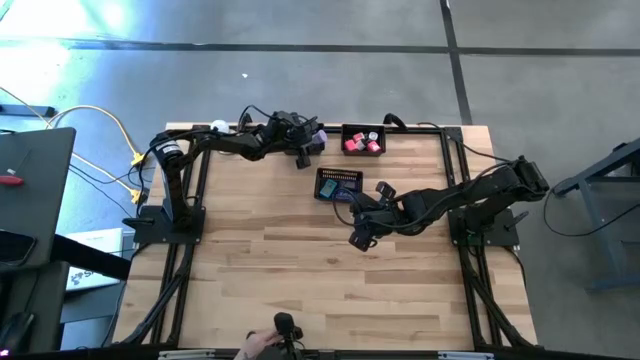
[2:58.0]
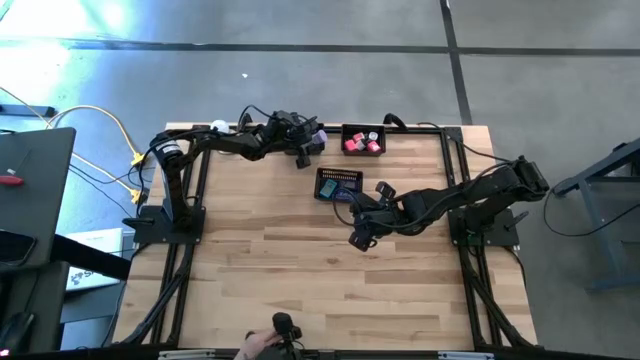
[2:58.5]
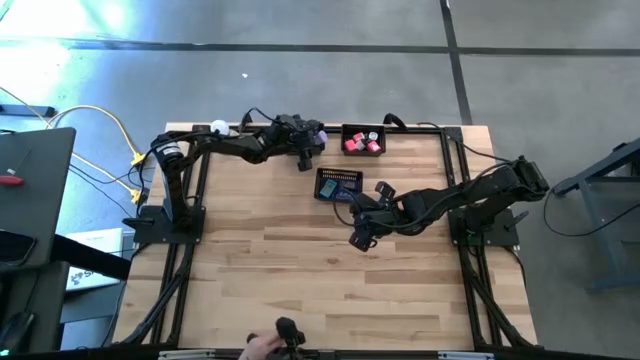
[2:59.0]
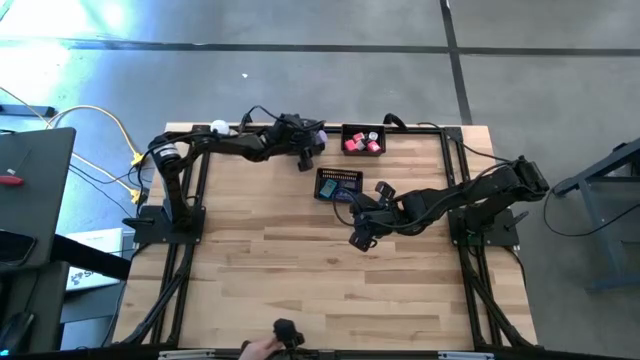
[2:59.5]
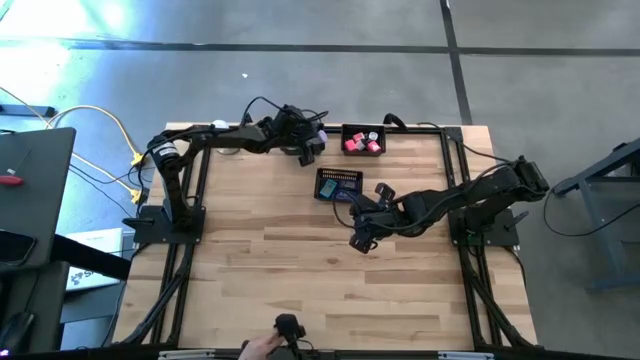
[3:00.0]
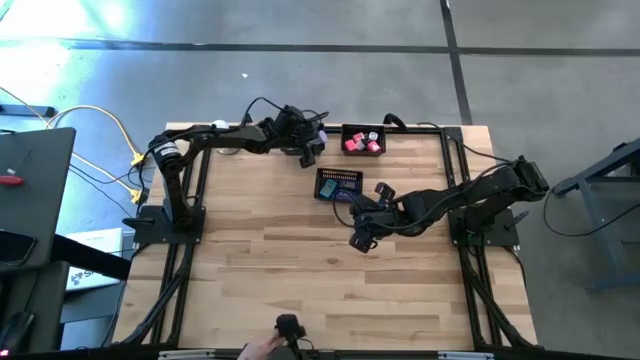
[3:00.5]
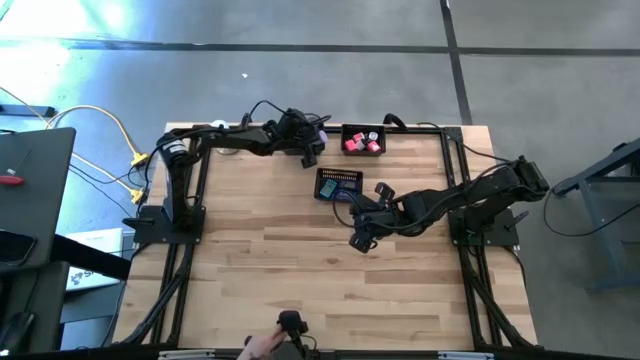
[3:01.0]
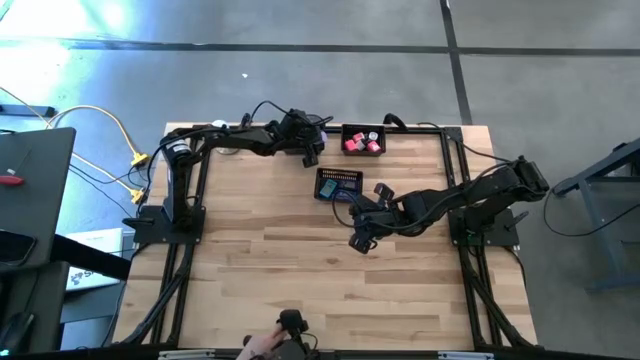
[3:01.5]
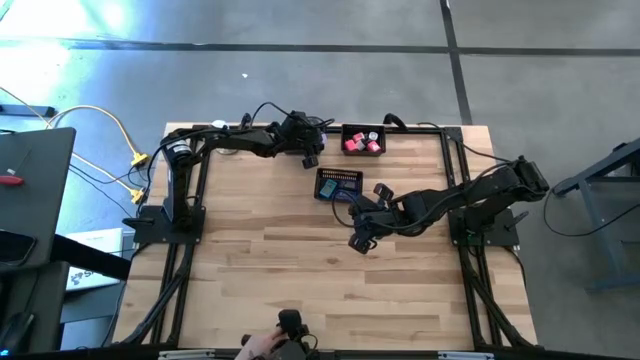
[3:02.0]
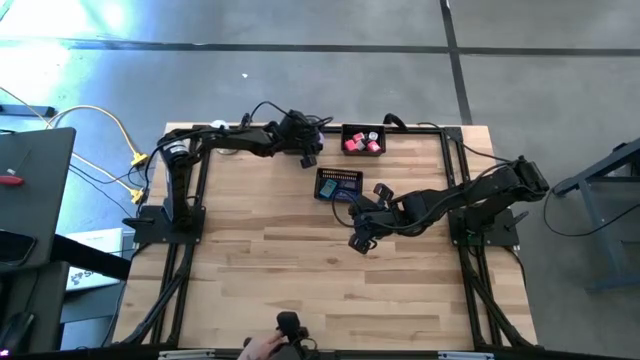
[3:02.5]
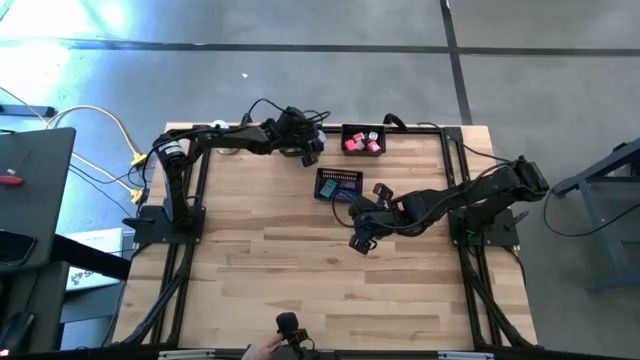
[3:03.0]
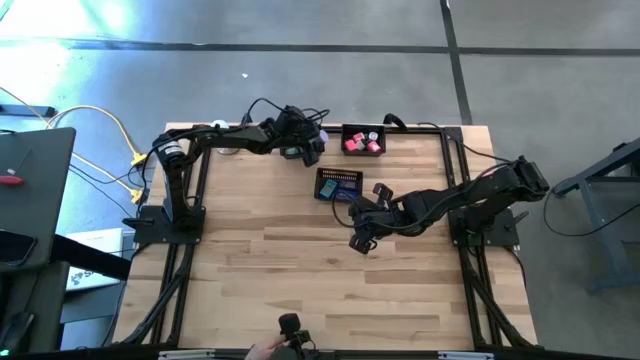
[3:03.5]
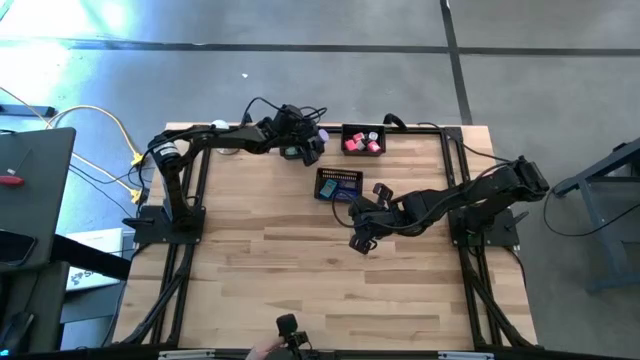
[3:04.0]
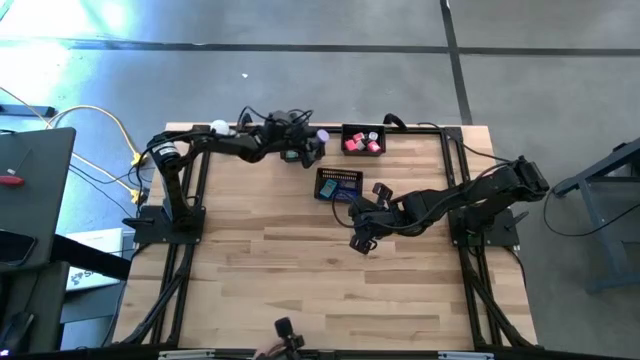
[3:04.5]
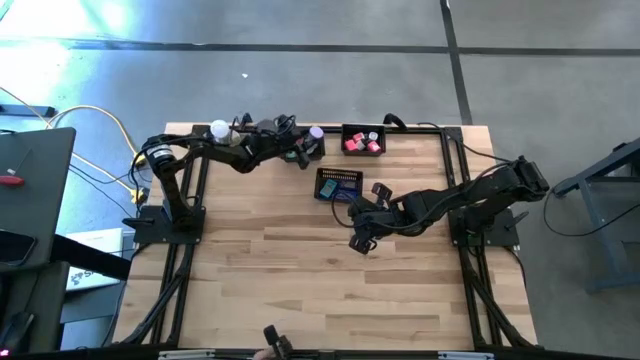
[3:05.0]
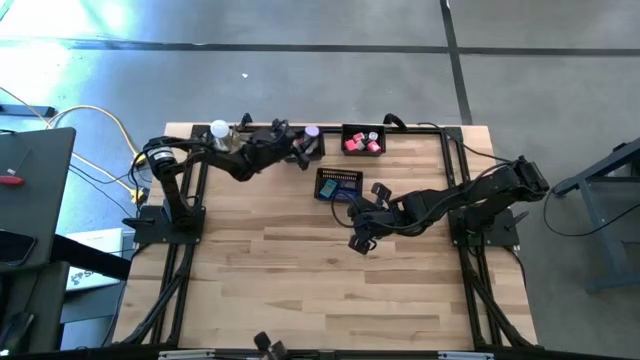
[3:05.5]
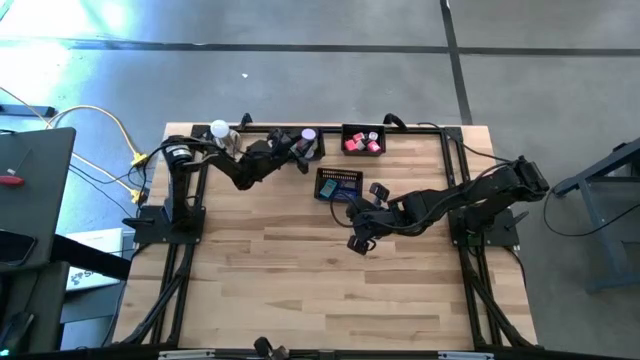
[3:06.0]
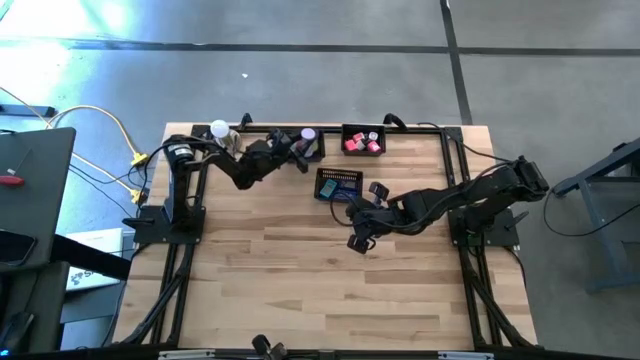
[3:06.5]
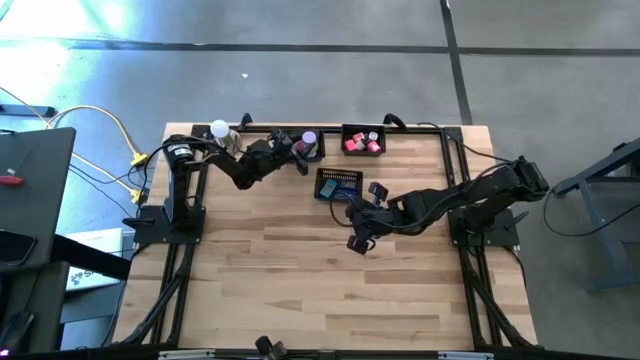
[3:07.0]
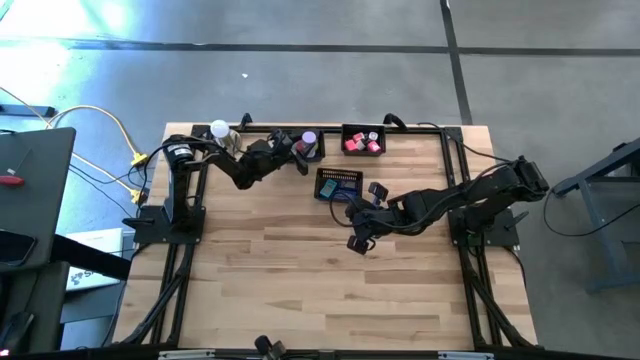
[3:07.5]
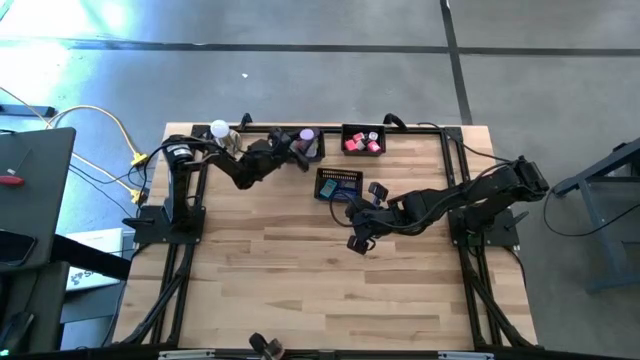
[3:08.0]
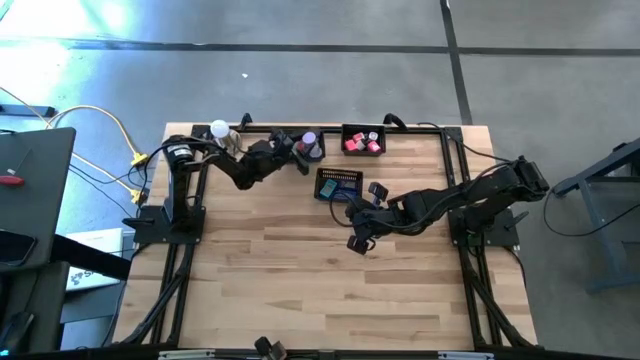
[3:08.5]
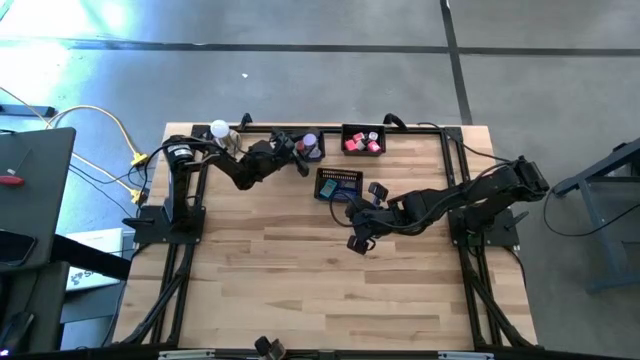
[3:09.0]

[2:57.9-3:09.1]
Task: Pick & Place Office items
Adjust the hourglasses on the top left black bin

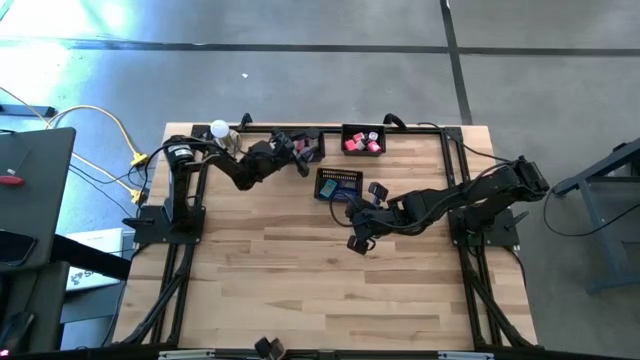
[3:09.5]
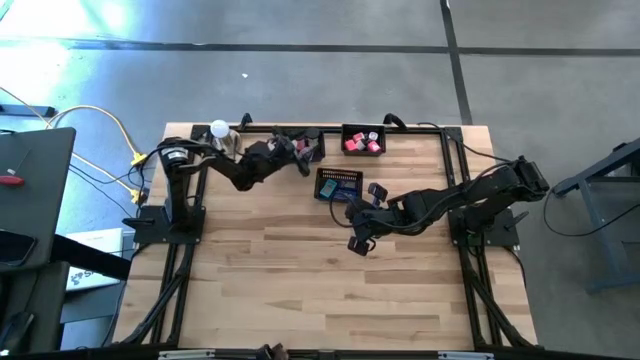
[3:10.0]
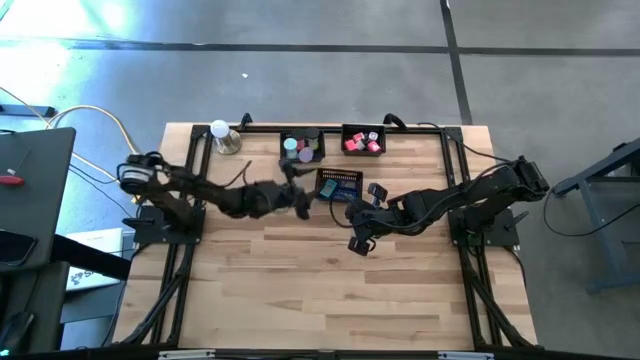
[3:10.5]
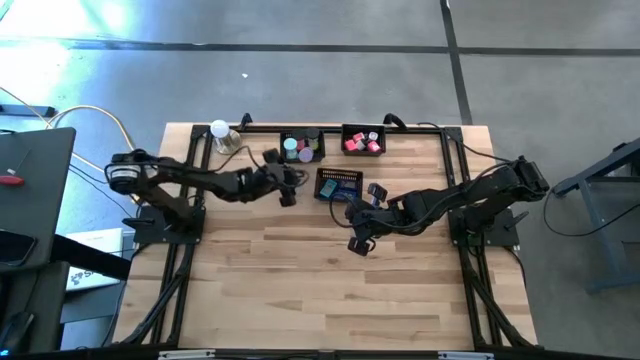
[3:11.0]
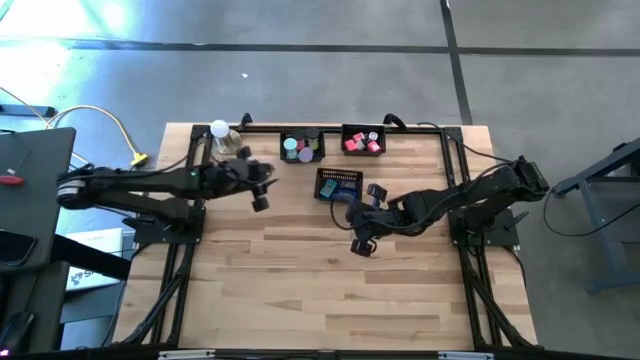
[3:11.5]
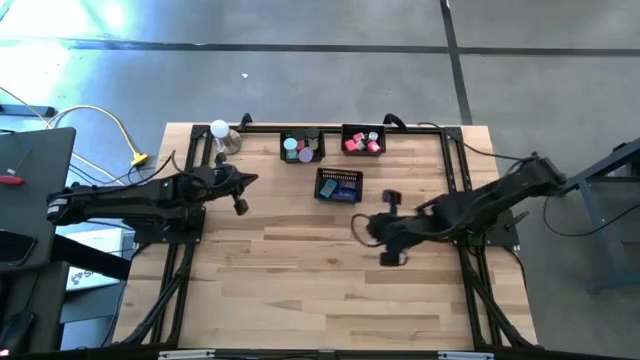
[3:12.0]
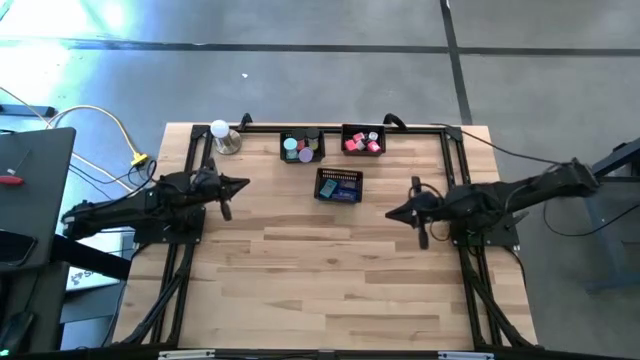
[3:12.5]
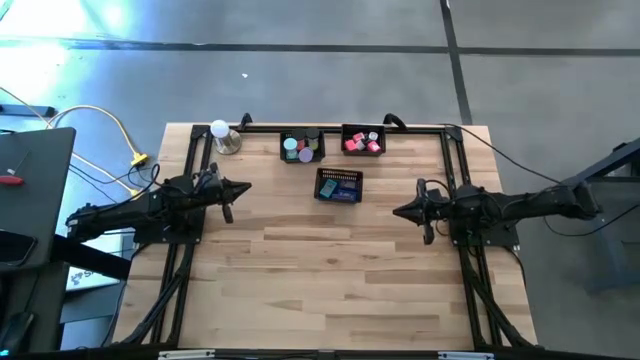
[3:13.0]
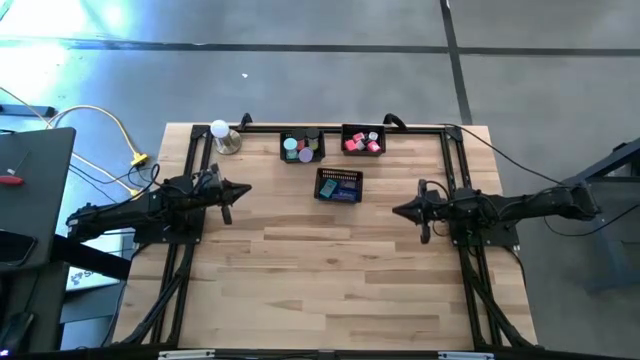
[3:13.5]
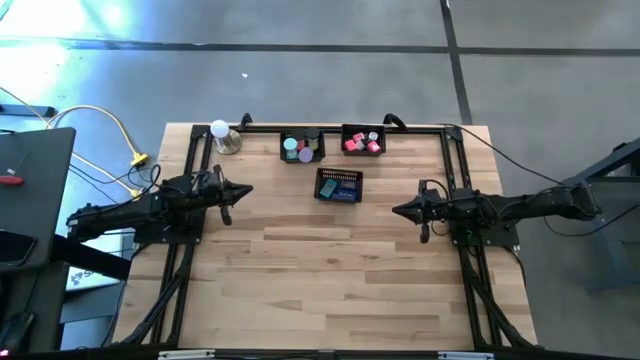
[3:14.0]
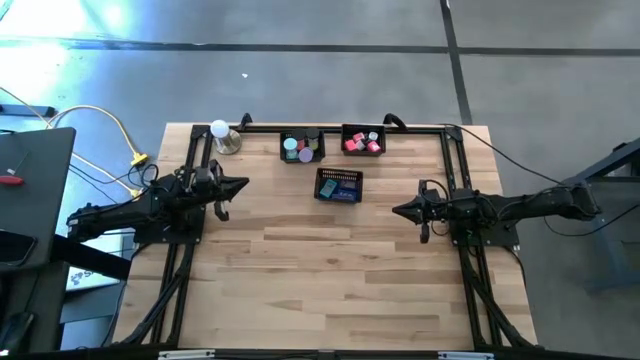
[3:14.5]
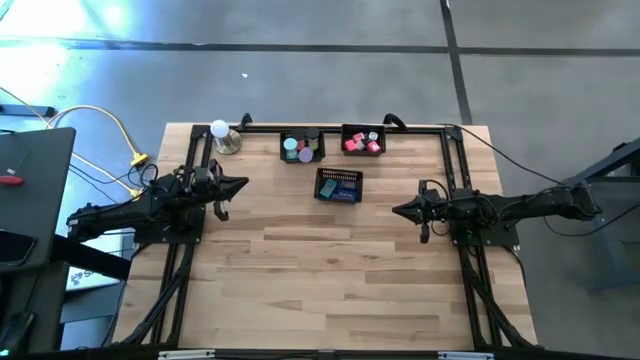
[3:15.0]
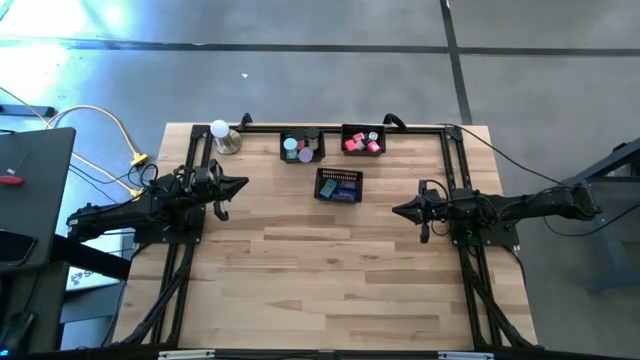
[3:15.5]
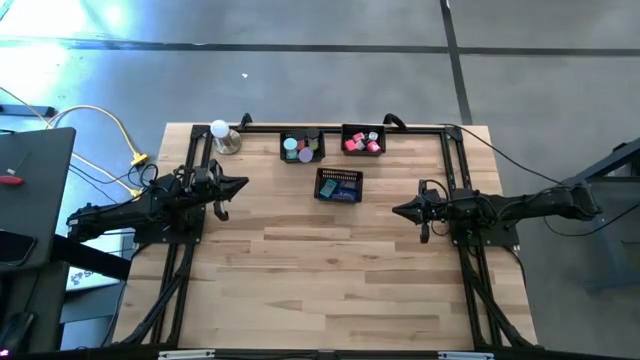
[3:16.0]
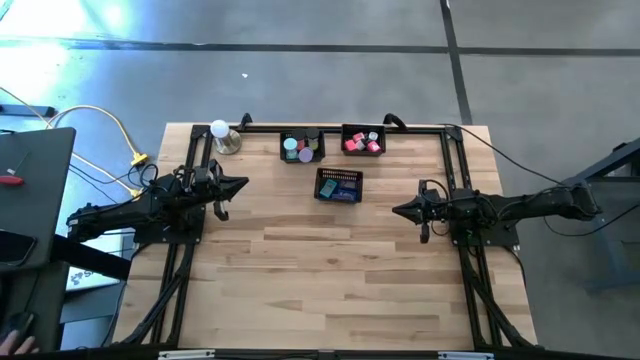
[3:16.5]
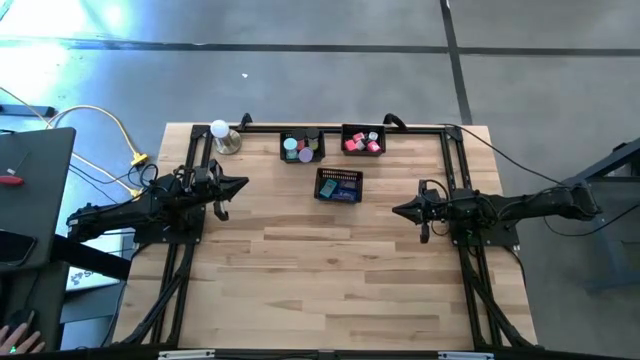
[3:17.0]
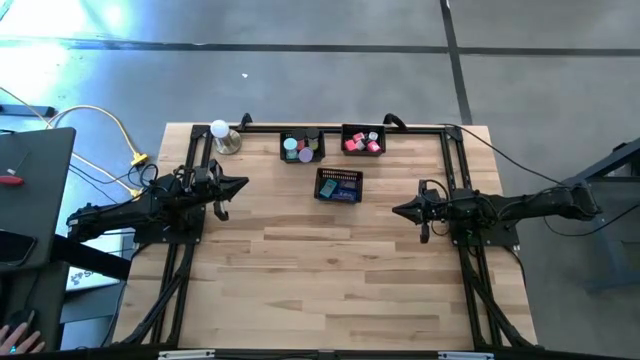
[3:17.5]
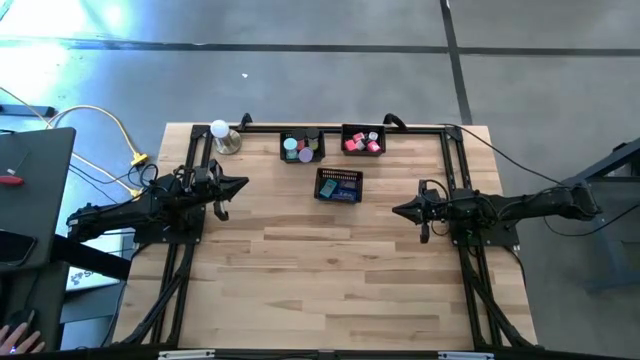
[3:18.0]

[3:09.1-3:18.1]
Return to Home Position
